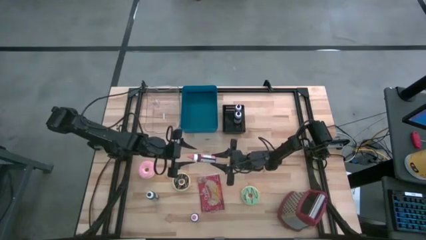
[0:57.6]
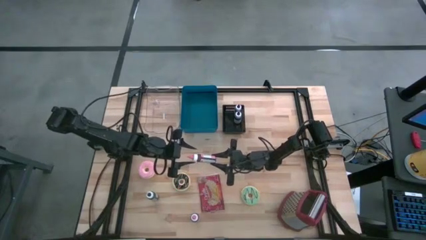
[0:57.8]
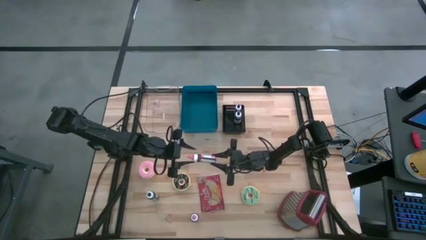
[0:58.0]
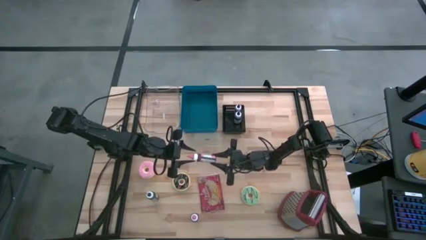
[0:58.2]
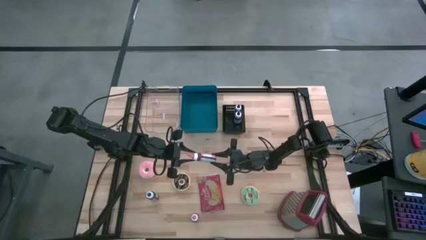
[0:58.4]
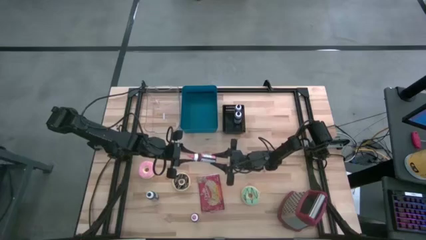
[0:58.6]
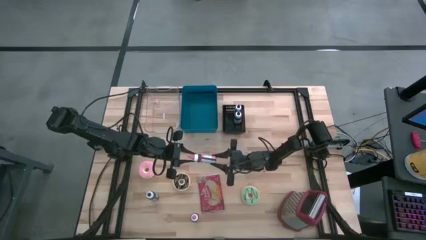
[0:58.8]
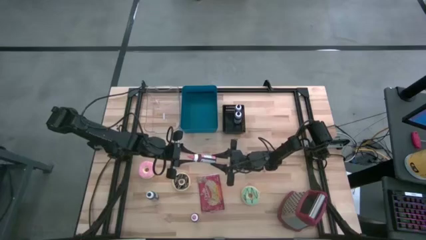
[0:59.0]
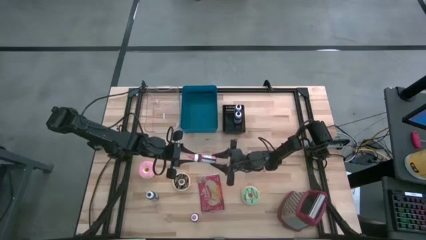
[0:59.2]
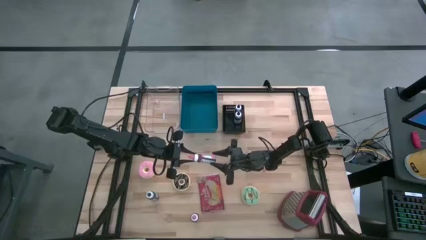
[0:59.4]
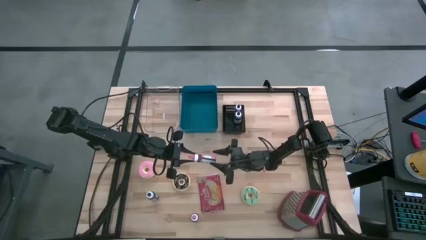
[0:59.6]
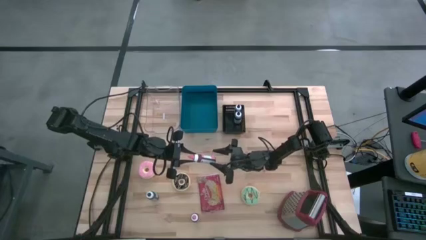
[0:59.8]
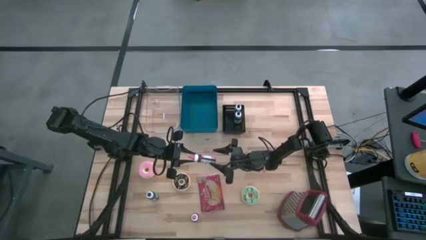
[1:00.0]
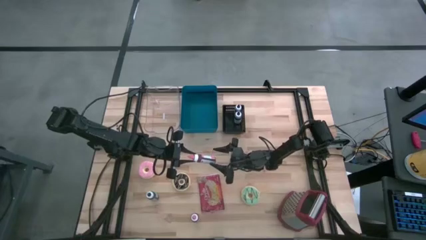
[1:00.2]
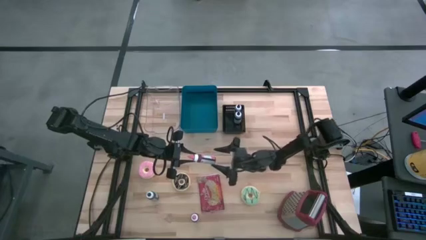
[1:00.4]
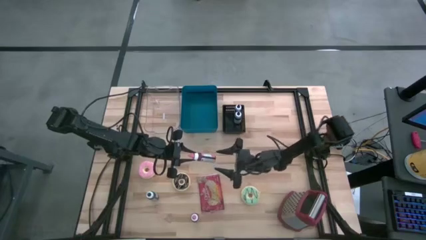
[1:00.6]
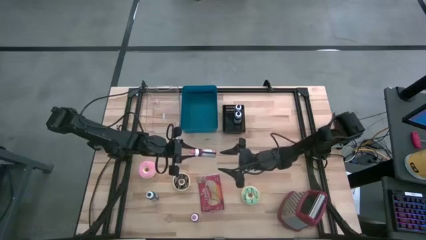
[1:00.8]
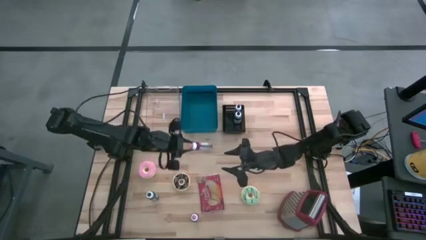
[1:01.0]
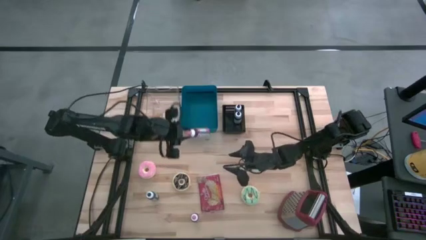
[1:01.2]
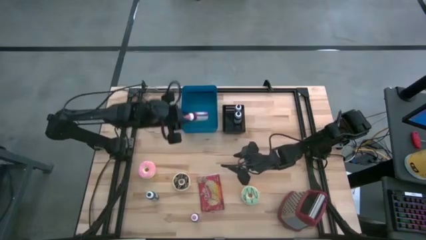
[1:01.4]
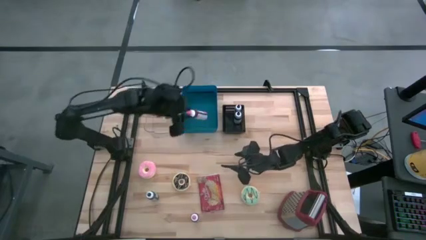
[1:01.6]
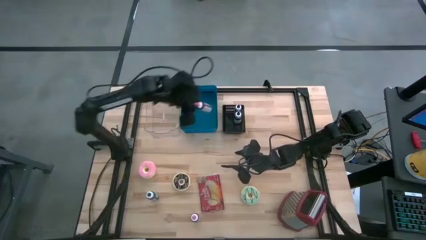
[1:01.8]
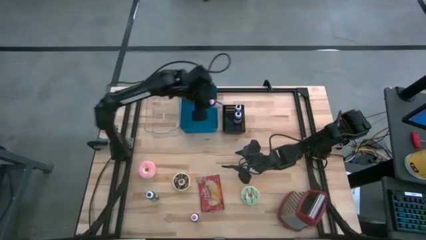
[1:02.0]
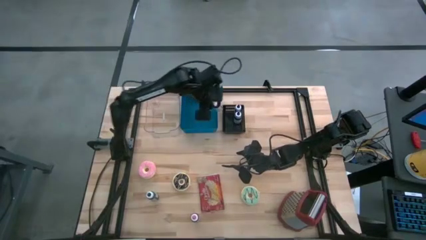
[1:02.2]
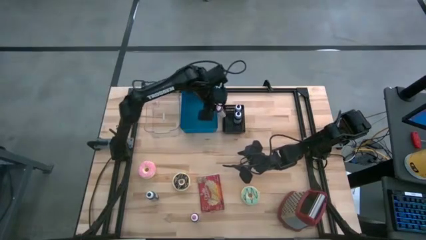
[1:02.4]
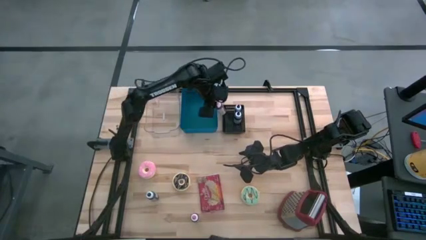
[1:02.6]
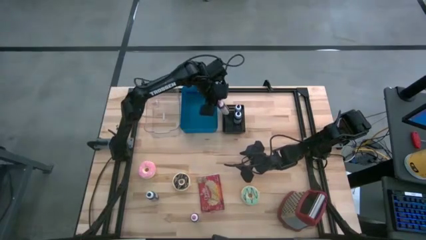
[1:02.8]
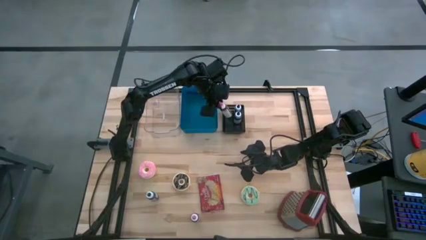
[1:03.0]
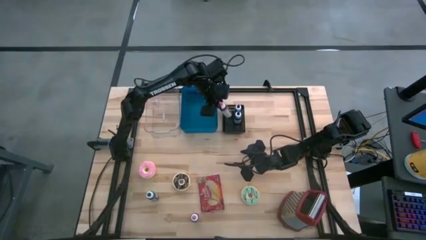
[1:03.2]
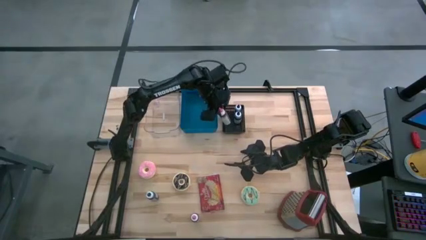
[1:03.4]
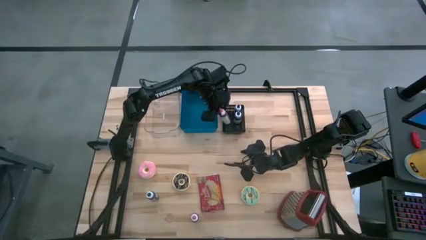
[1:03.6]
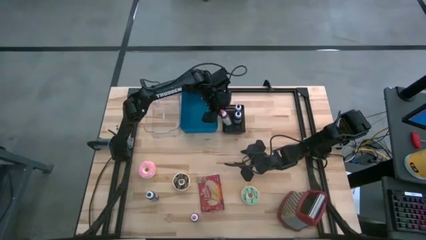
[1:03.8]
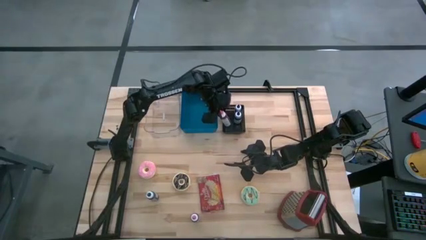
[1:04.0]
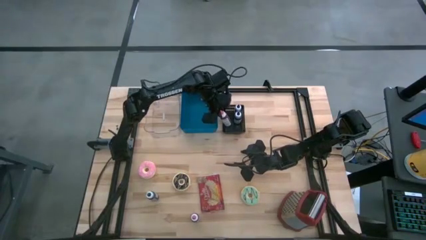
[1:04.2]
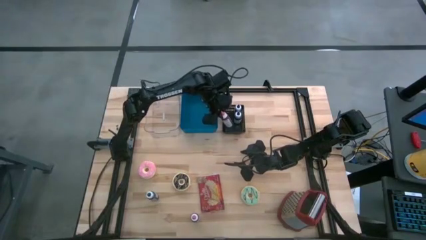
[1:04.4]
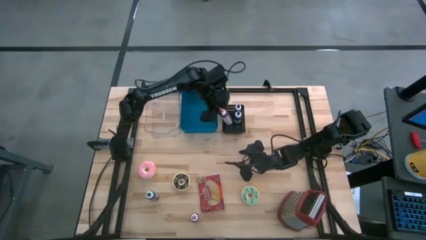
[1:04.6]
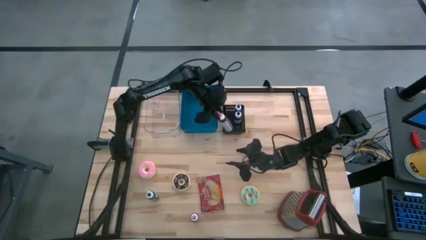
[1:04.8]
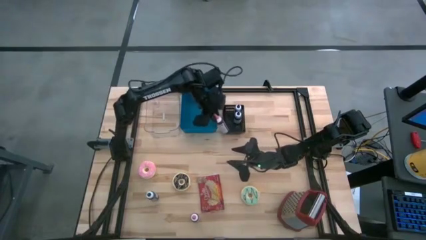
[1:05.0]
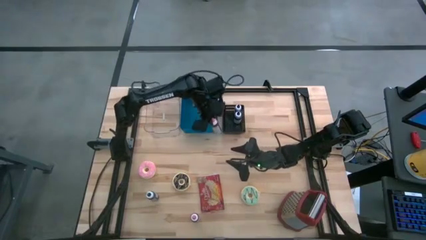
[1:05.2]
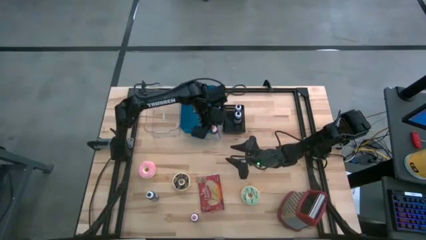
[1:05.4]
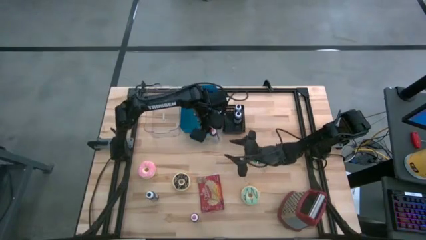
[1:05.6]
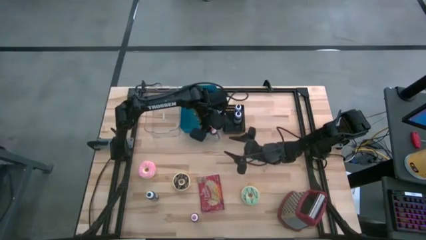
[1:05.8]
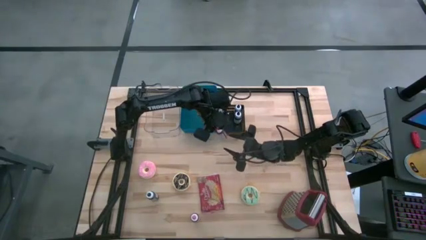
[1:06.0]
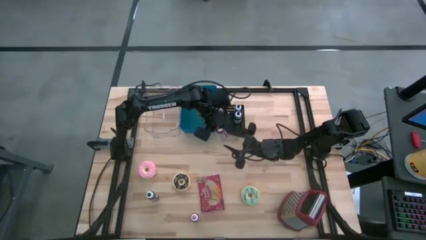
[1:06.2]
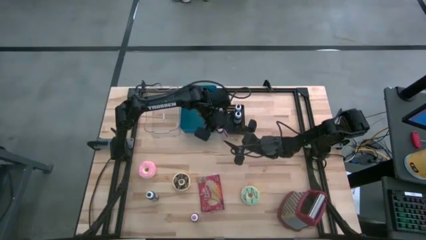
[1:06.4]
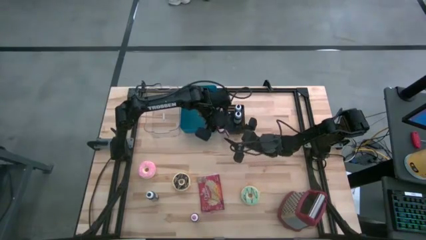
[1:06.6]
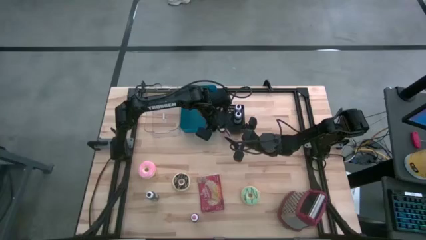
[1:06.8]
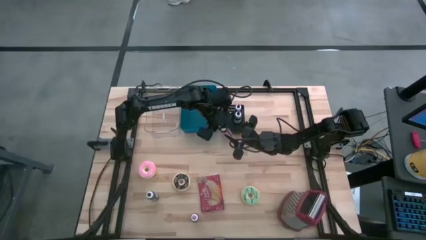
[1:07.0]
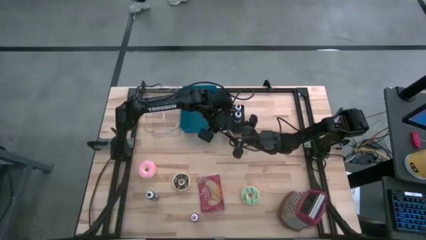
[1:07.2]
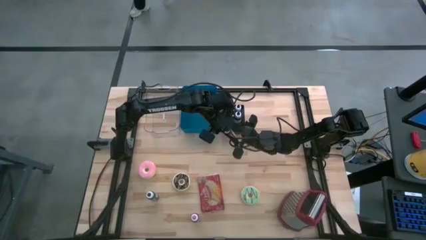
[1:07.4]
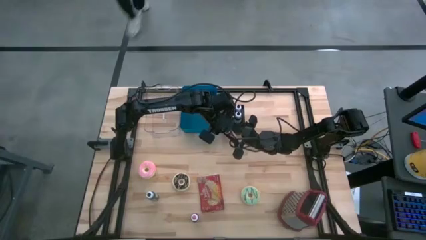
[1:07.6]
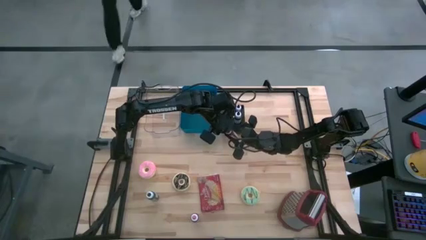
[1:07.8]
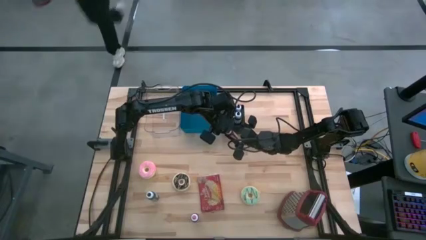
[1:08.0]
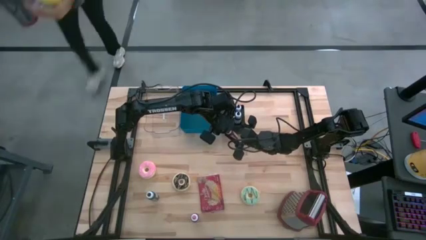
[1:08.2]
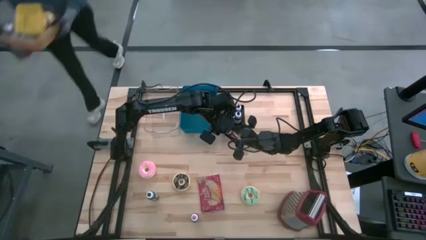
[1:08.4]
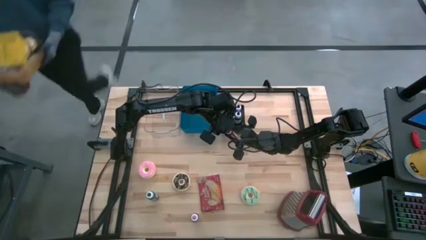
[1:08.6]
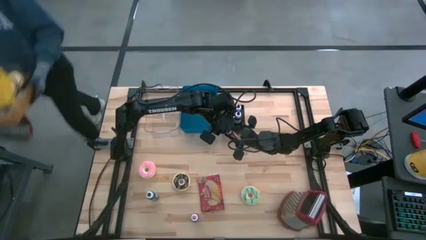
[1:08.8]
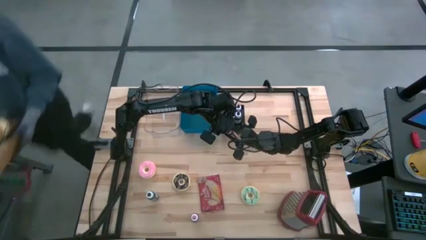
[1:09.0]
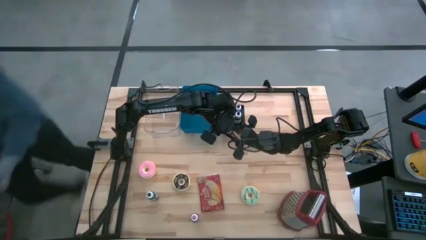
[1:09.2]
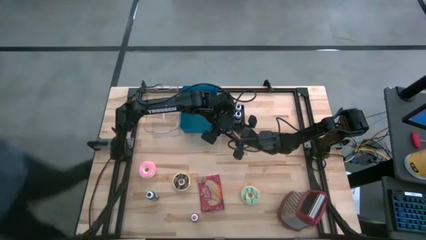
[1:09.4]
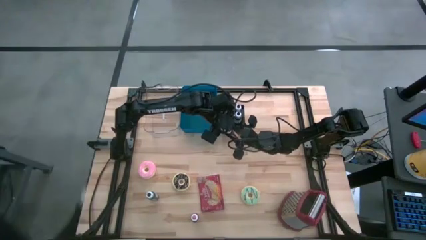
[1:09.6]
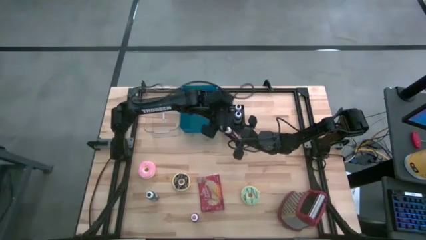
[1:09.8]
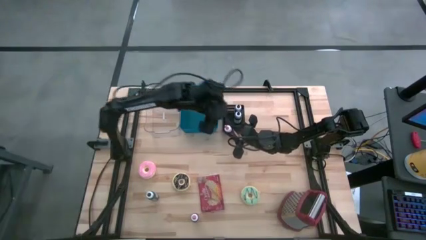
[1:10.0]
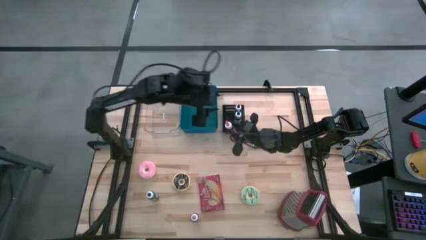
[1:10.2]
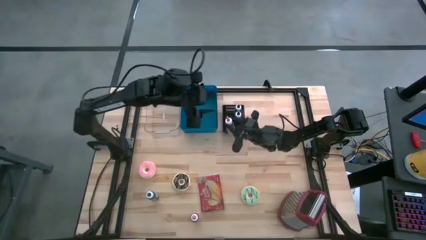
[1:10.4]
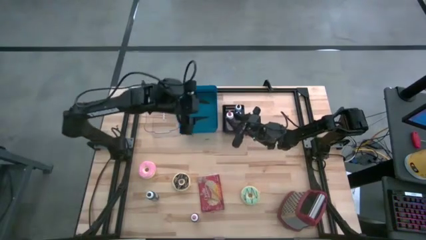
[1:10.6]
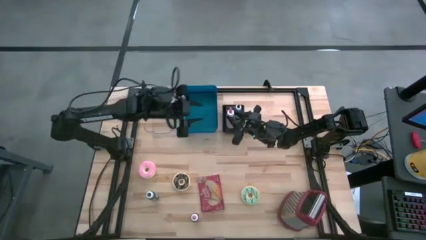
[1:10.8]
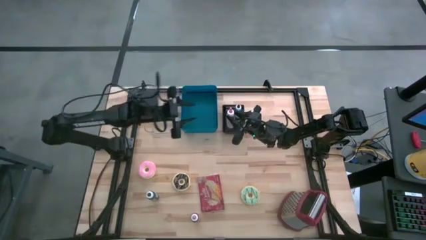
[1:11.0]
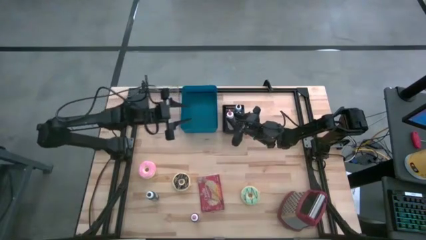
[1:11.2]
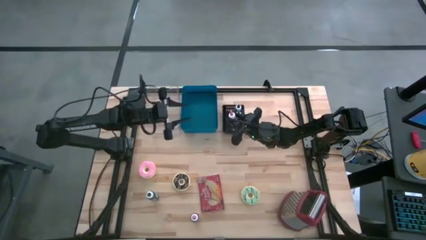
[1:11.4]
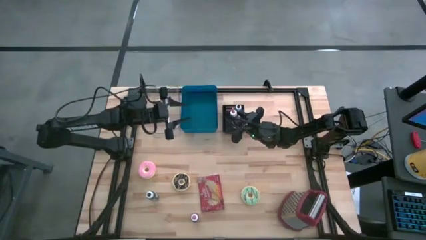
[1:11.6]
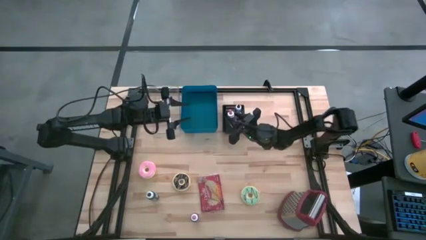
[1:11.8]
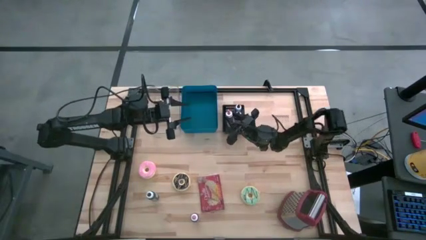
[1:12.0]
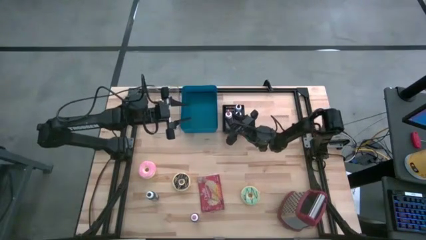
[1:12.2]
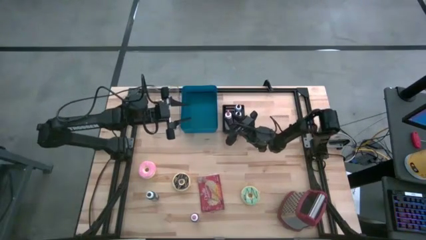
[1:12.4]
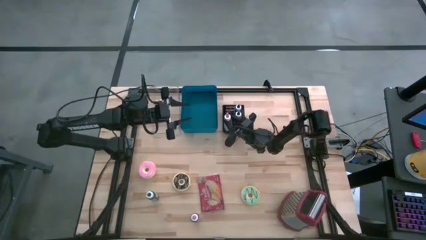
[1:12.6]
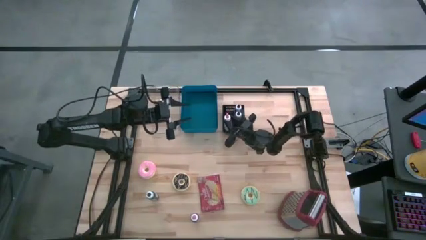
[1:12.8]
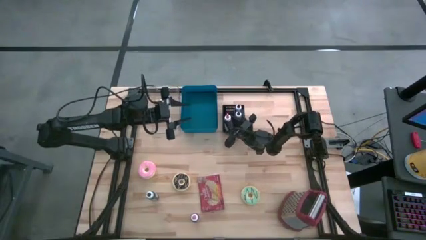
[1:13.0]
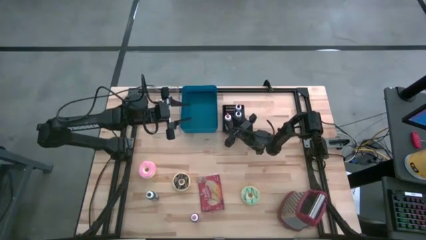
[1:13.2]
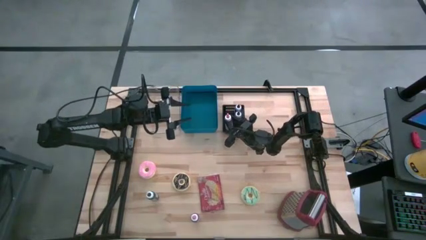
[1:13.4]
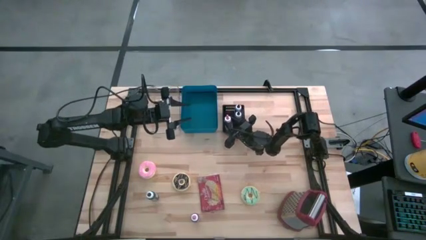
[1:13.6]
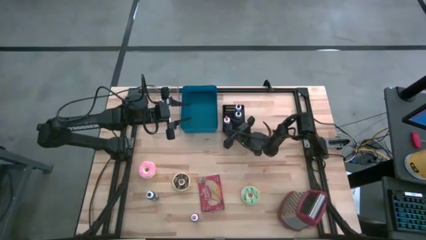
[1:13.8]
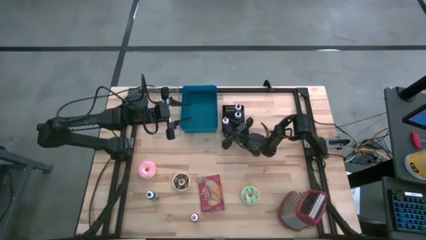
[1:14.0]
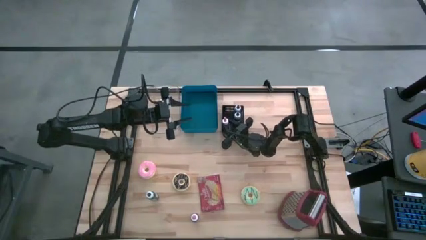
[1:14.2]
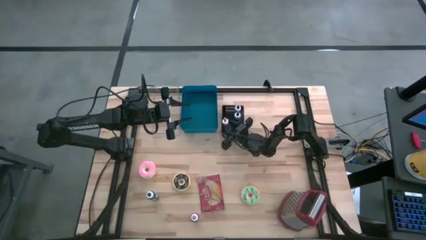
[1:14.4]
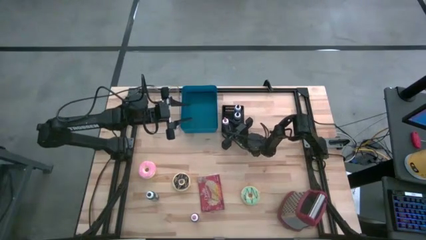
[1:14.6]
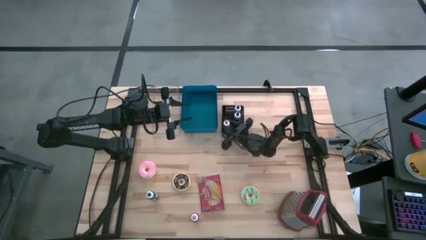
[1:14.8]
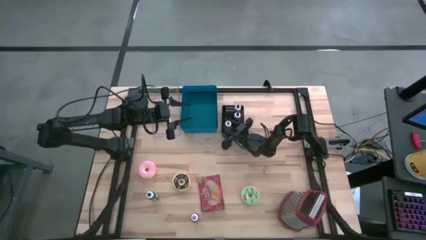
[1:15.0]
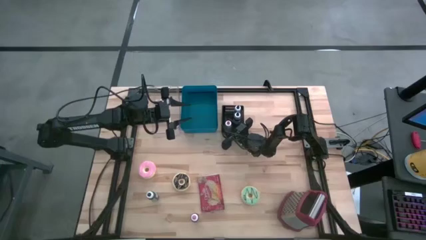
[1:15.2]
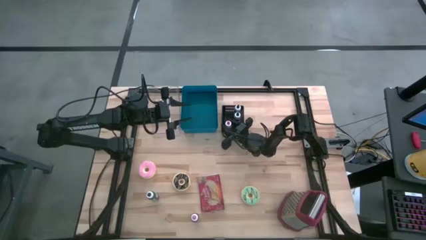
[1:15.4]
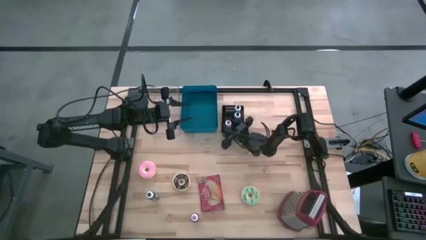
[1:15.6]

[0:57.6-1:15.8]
Put the top pink food coloring bottle into the black bin
